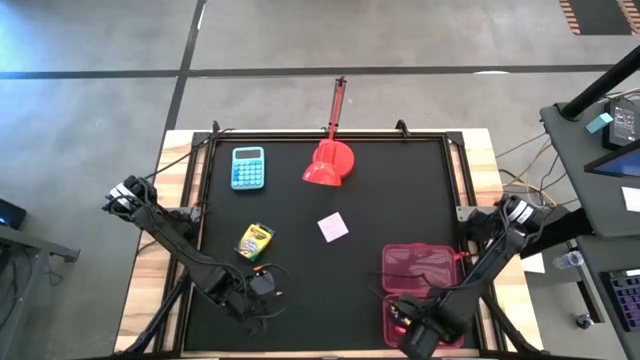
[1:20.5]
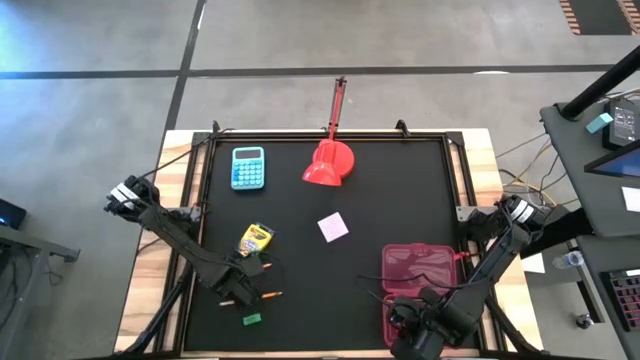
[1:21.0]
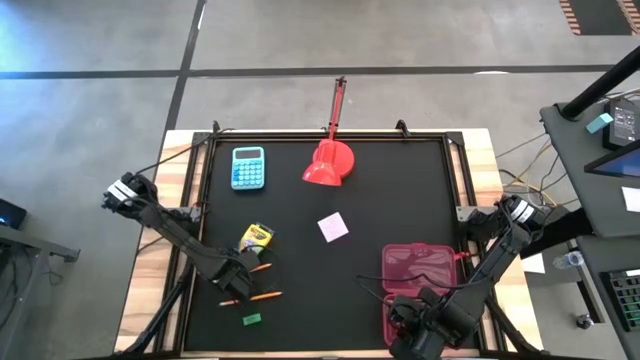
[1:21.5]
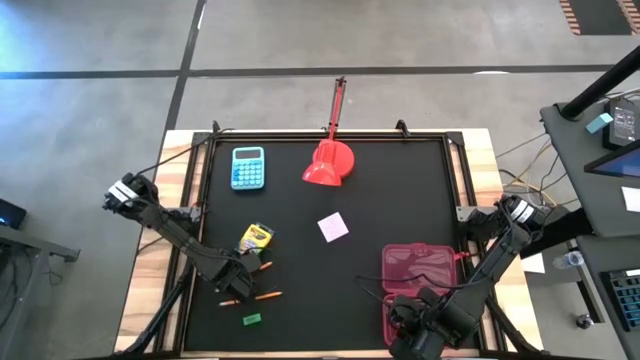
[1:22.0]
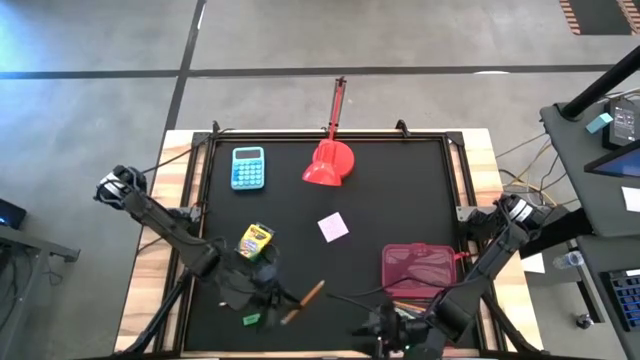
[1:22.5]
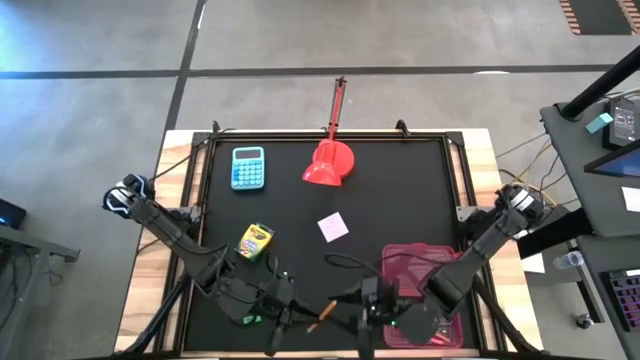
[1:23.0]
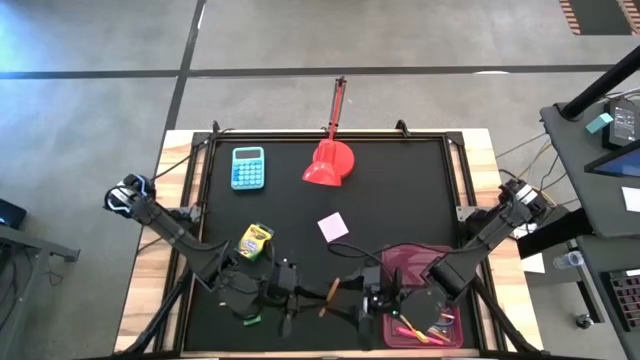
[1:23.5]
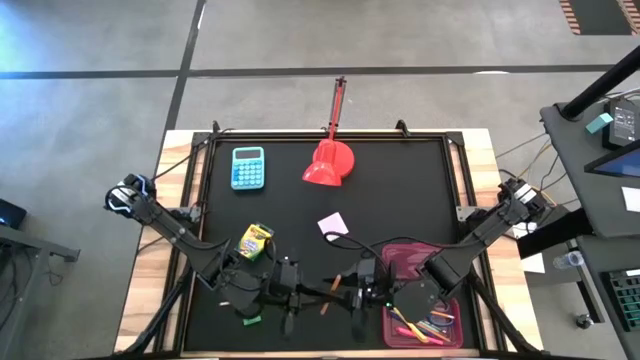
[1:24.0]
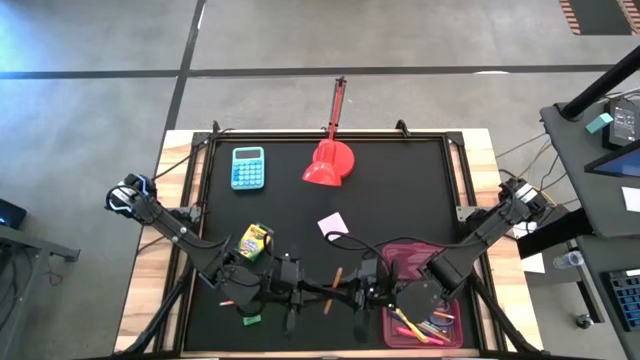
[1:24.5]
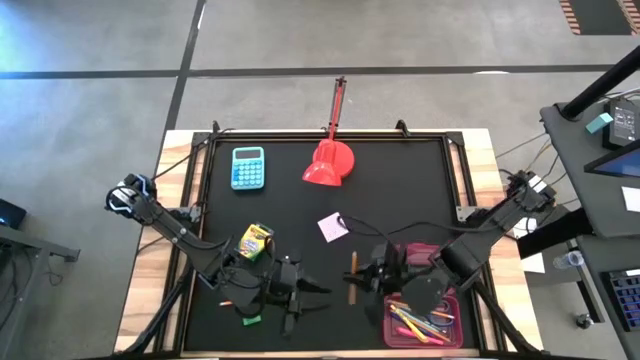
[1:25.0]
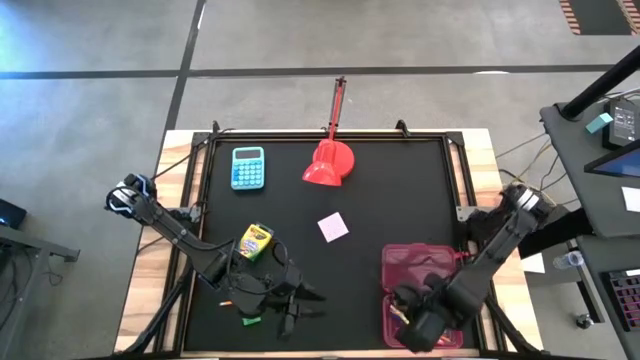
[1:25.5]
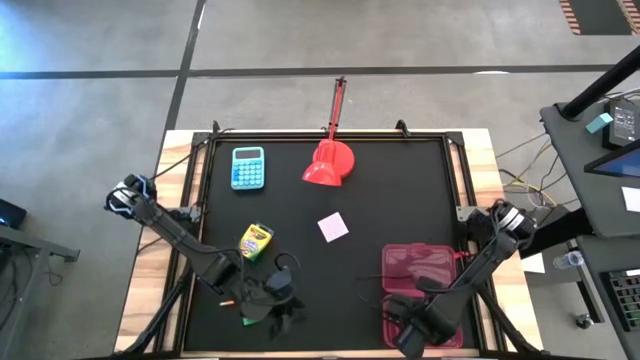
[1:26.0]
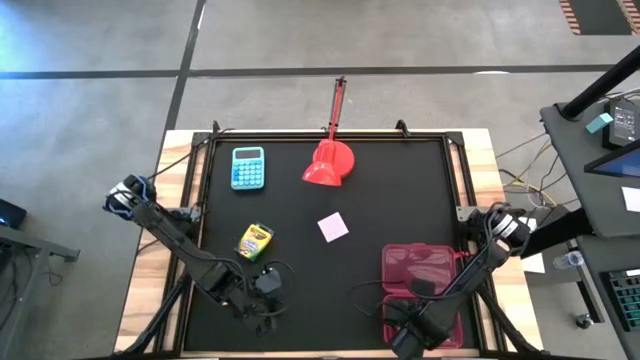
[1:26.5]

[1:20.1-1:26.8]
Task: Pack school essentials
Put the orange pencil into the pink supply box

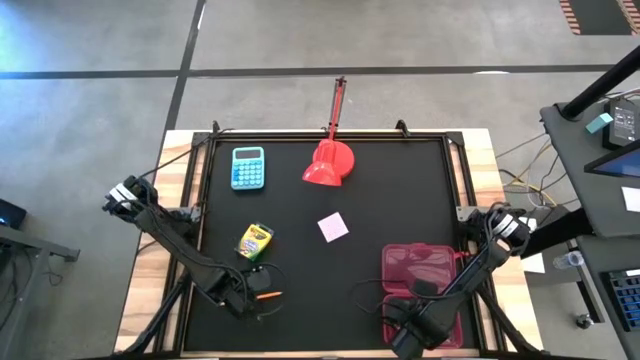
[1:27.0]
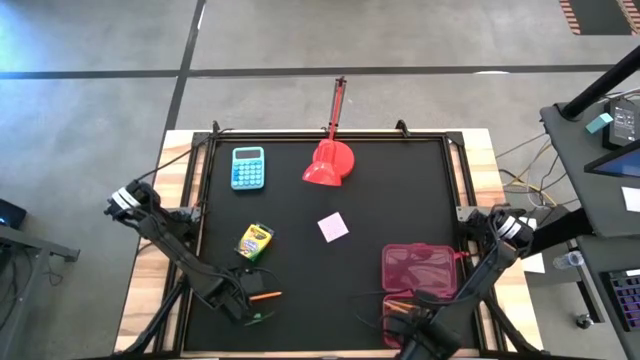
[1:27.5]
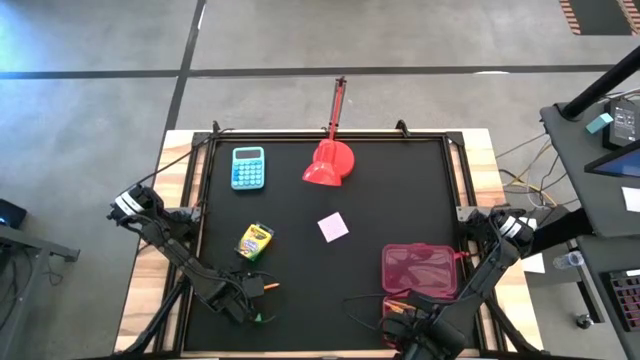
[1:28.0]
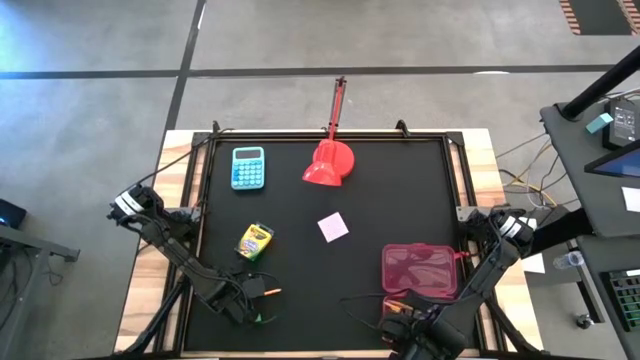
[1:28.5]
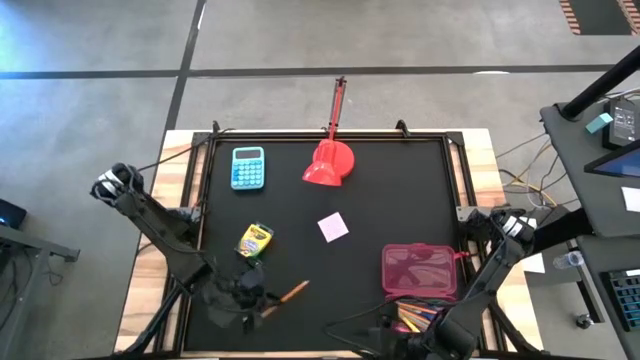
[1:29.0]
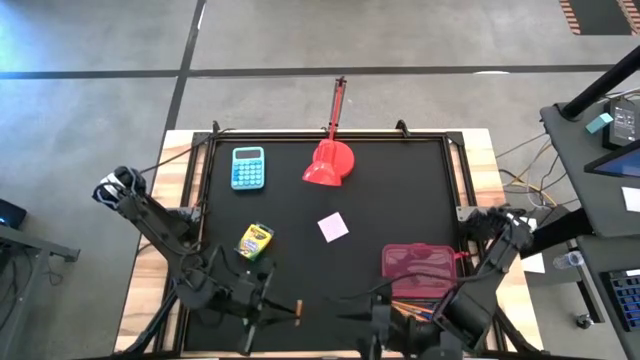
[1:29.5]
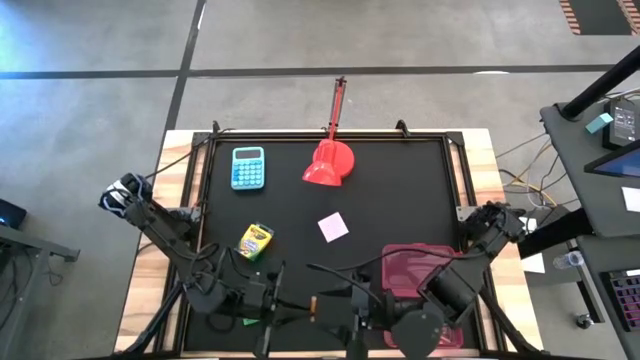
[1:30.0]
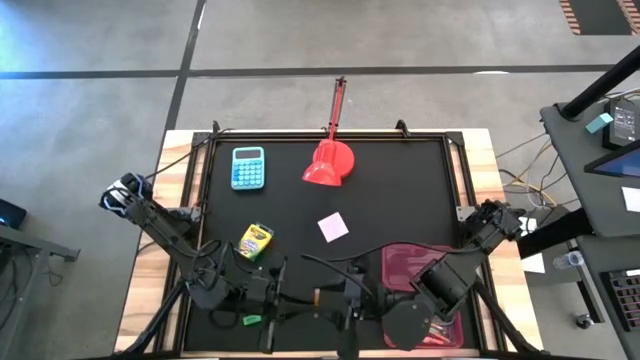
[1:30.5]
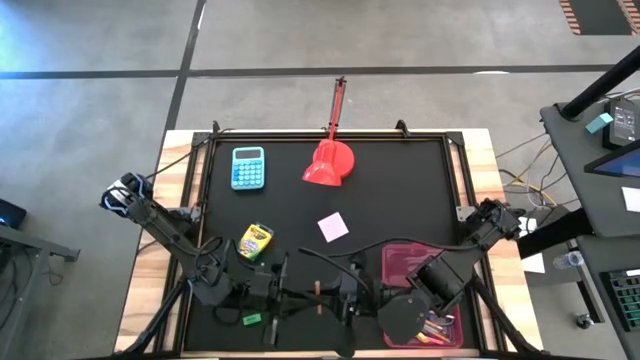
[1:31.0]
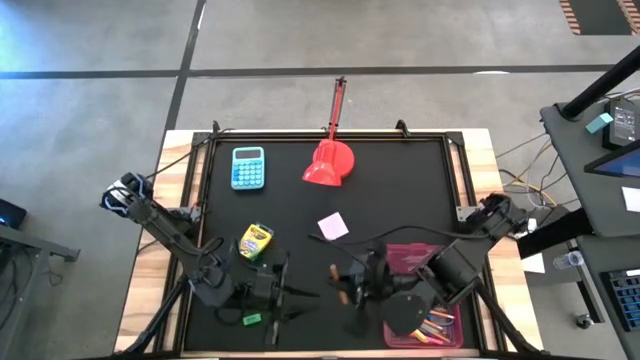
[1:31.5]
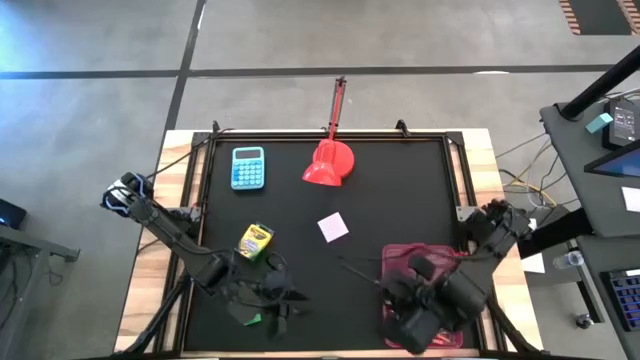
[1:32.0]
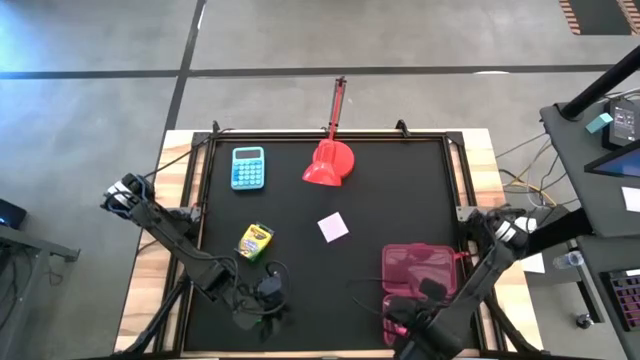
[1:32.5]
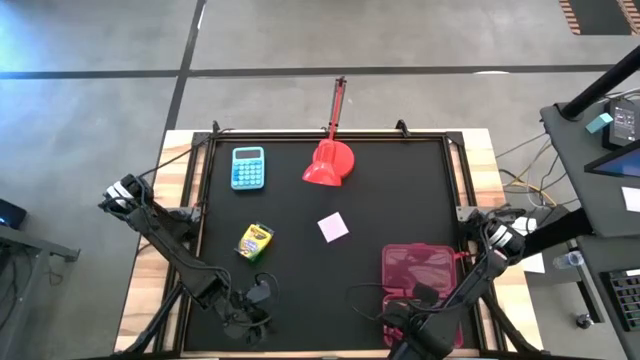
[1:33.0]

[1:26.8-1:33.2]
Put the orange pencil into the pink supply box

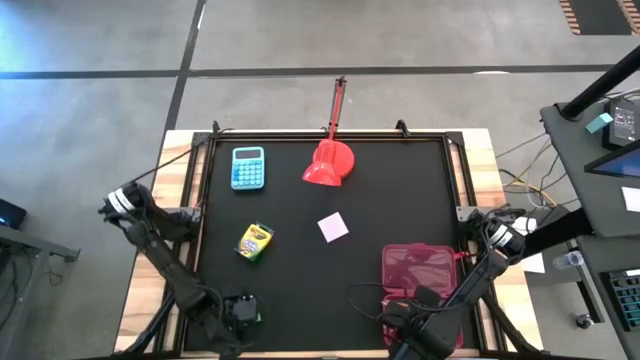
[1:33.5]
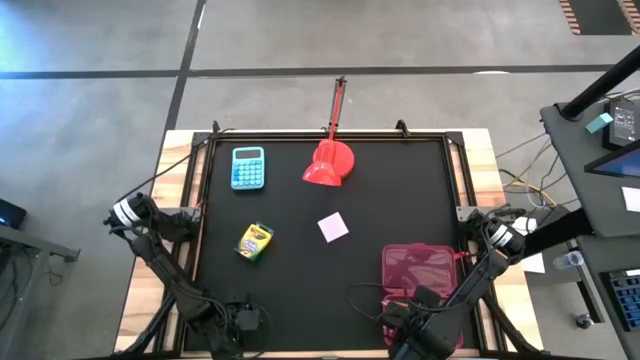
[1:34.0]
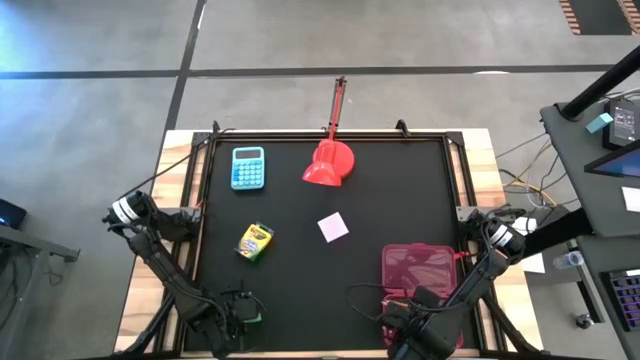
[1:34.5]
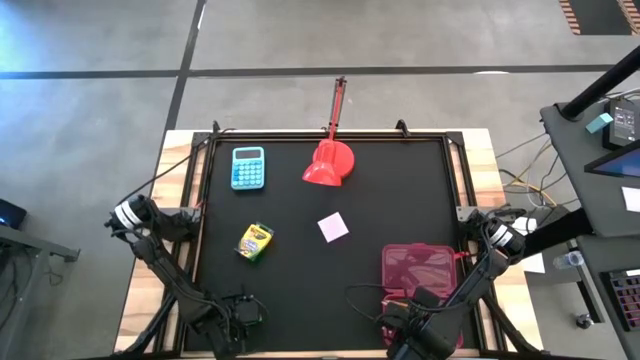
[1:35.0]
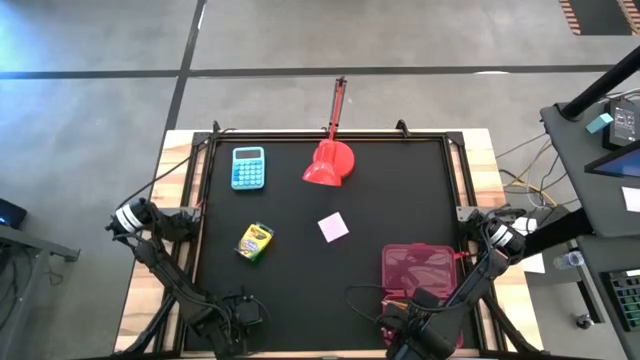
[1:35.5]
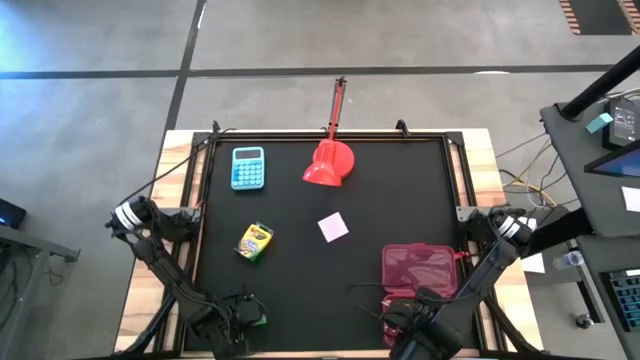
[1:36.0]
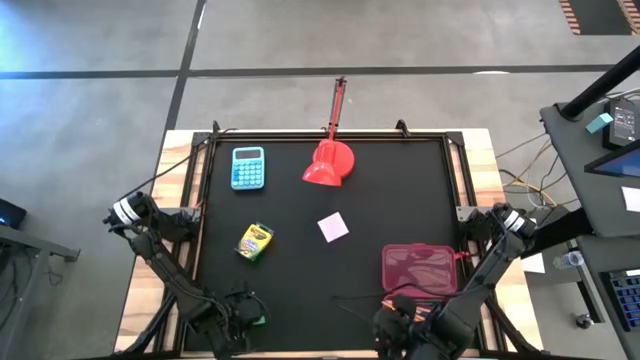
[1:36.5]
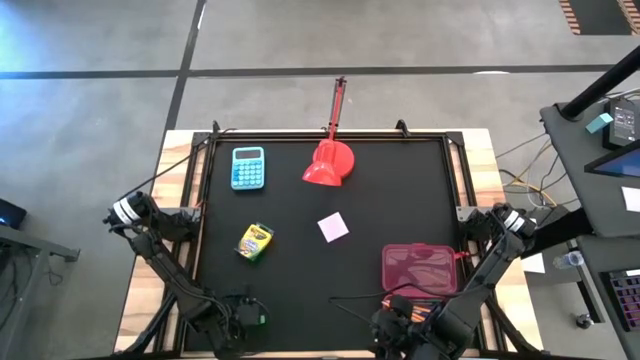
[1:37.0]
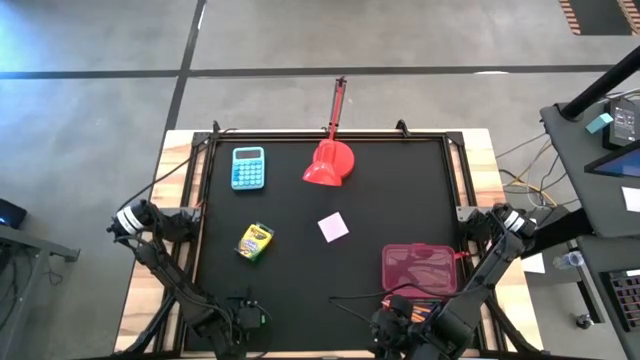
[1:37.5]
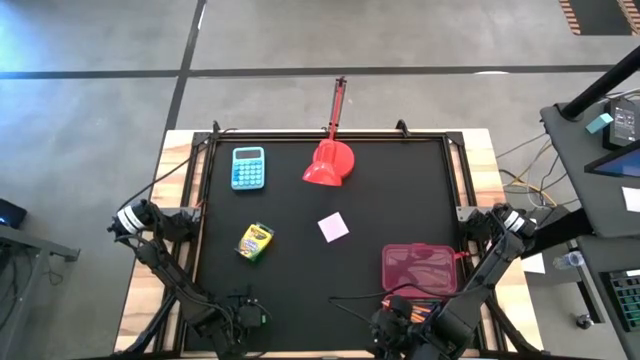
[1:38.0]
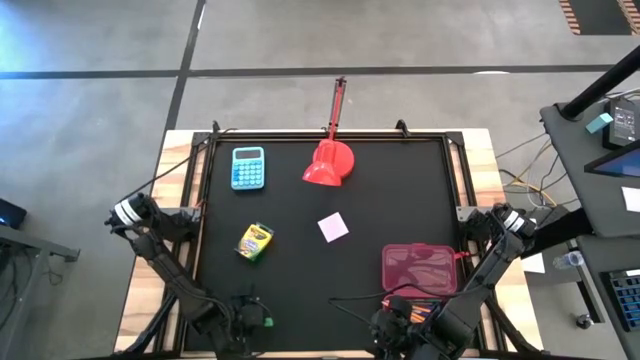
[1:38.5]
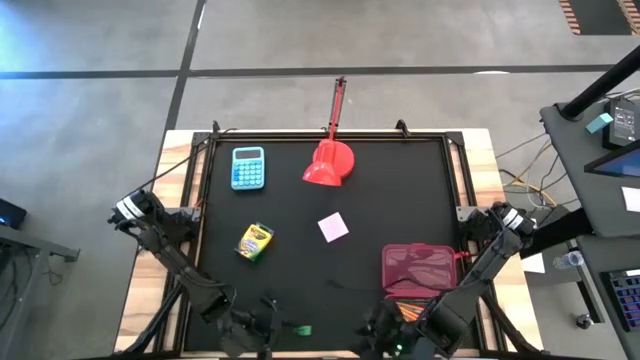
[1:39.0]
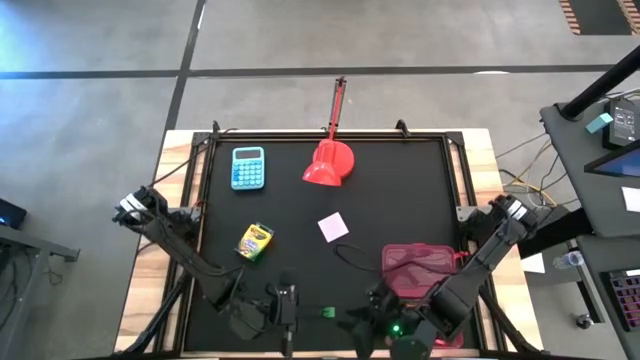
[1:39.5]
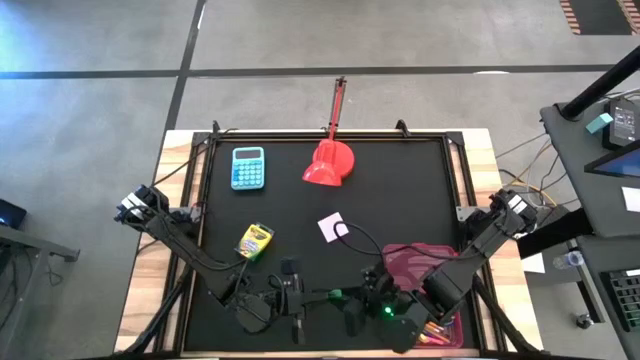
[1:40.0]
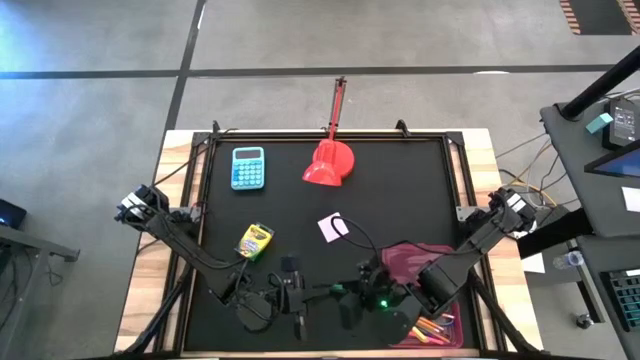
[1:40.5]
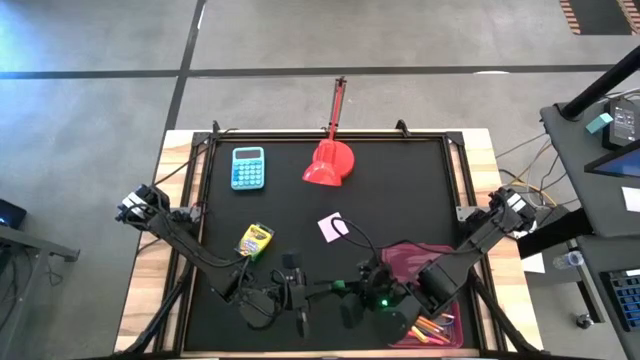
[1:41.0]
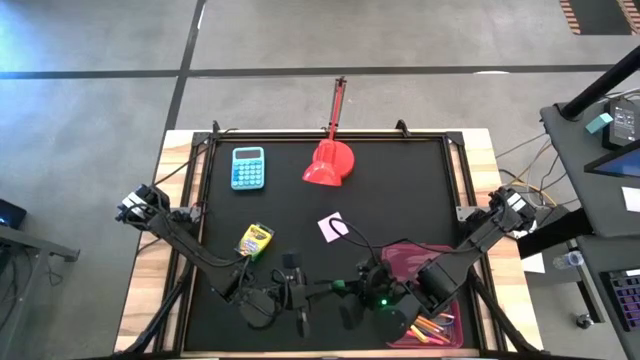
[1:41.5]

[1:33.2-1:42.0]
Put the green eraser into the pink supply box
